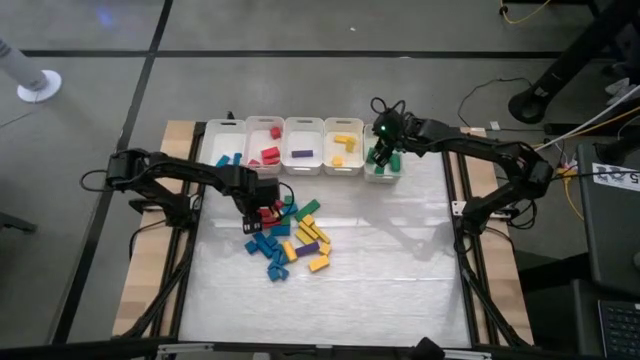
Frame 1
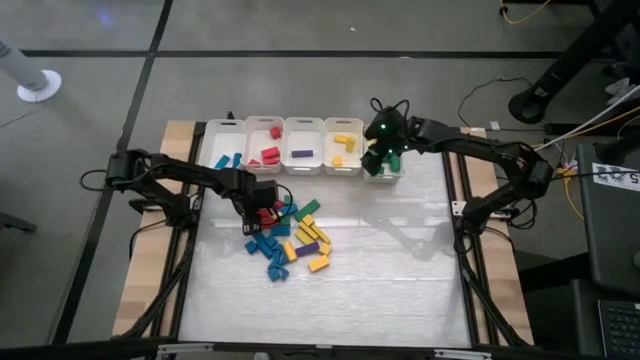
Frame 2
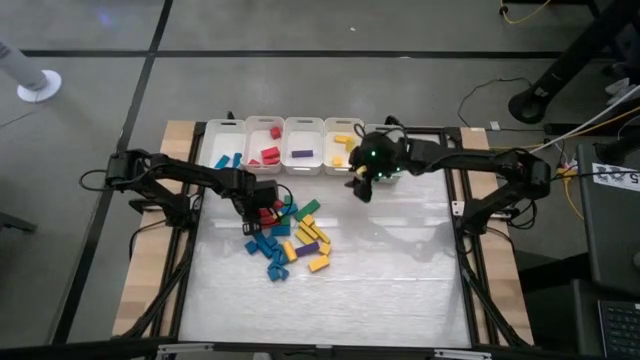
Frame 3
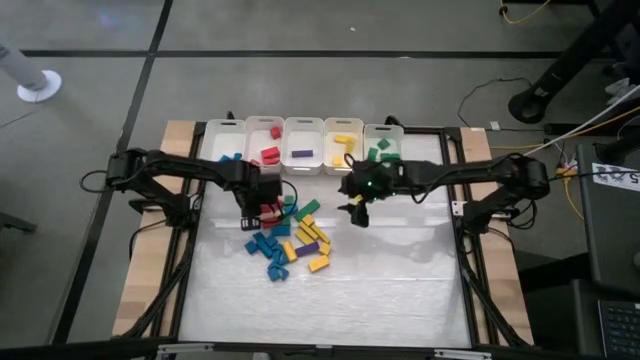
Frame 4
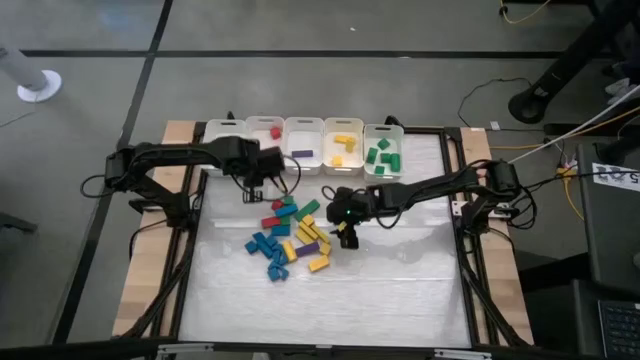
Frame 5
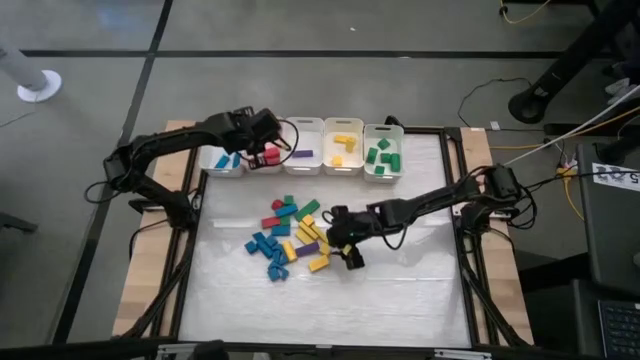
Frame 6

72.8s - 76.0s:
Task: Sort blocks
Put the red block into the middle left white bin

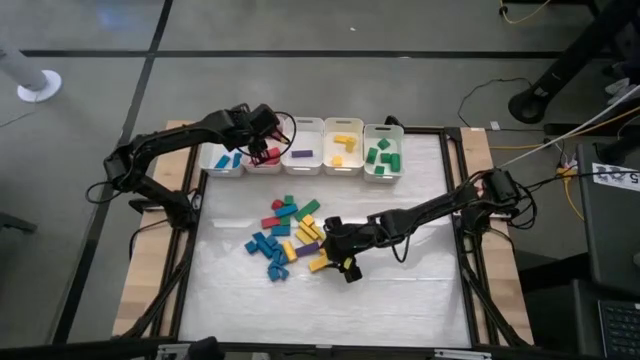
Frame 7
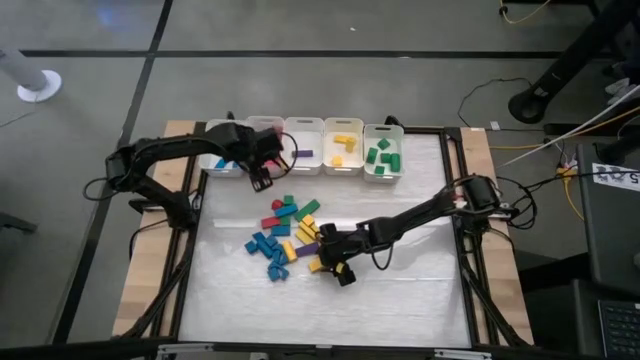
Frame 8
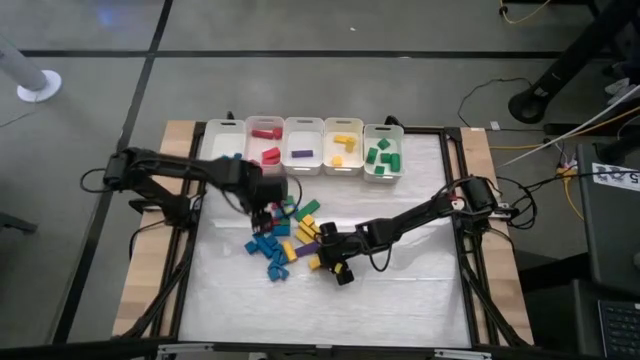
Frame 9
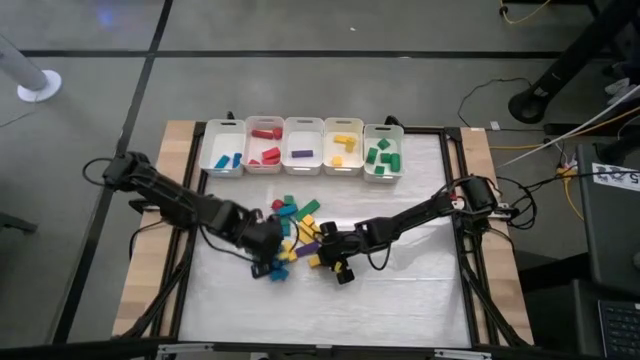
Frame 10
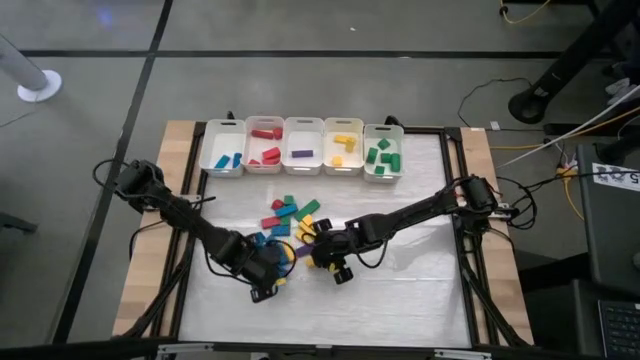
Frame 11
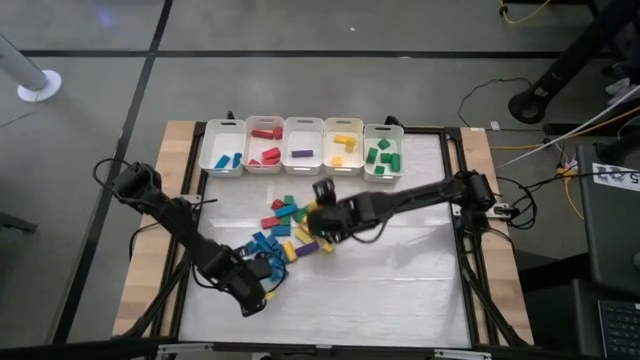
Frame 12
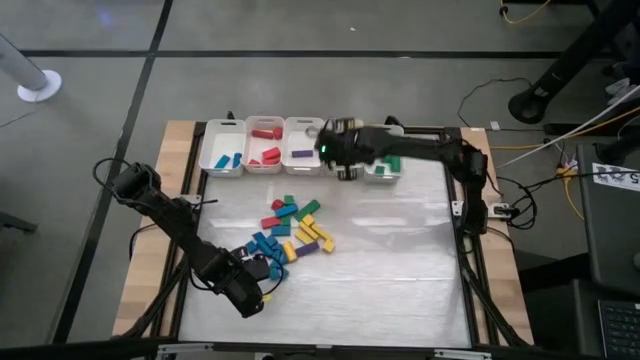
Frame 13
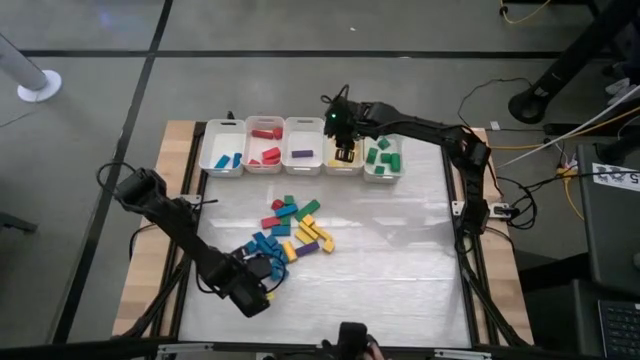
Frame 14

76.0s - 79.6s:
Put the yellow block into the middle right white bin

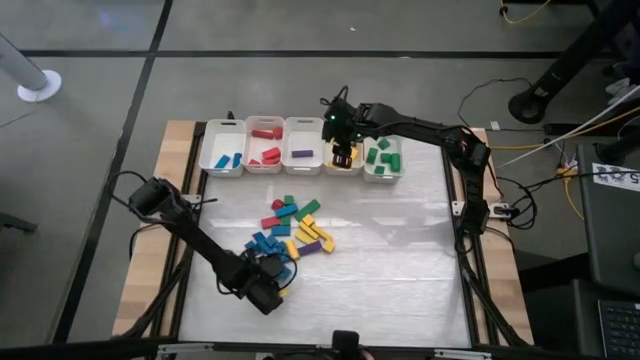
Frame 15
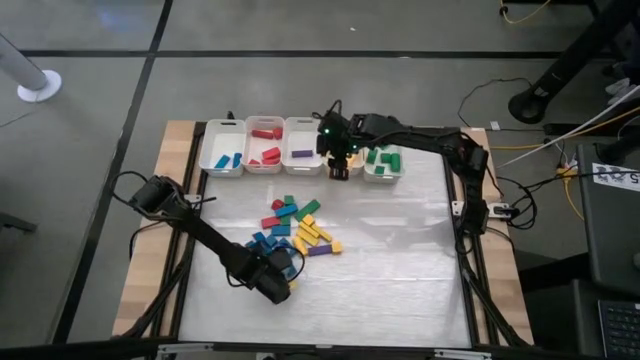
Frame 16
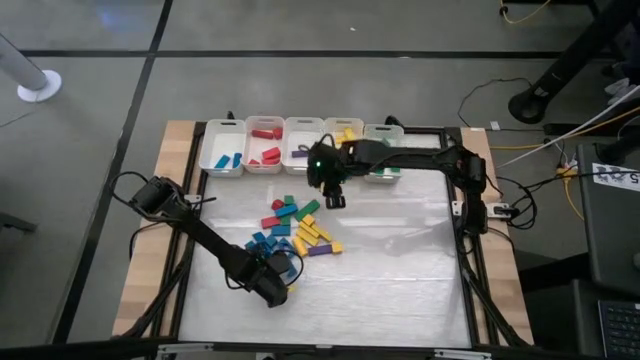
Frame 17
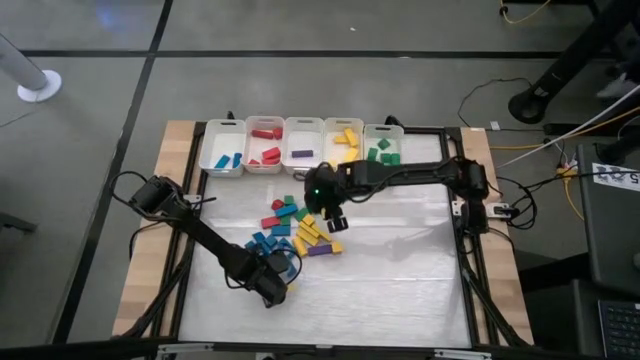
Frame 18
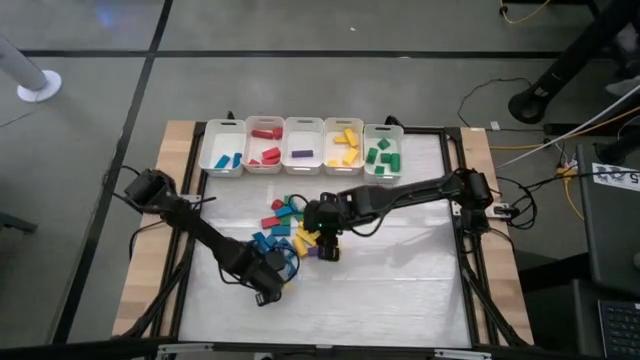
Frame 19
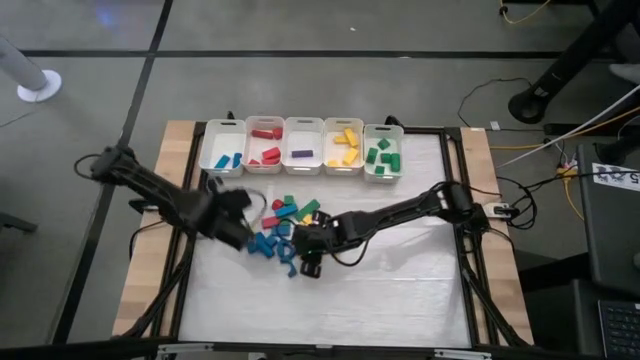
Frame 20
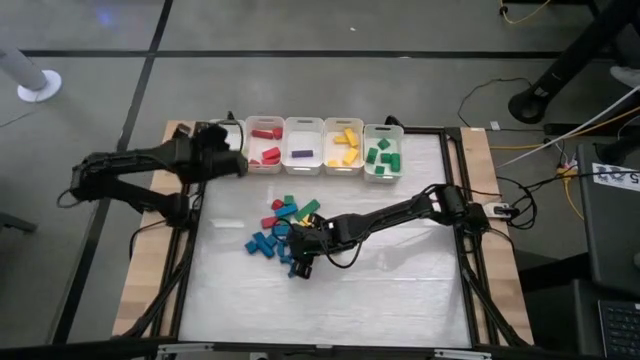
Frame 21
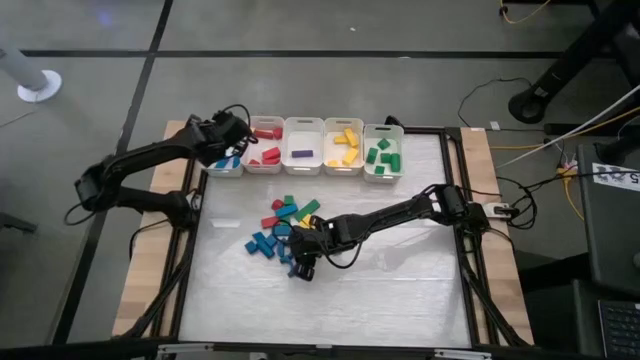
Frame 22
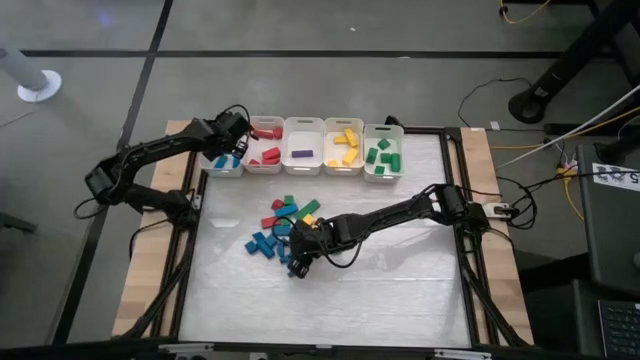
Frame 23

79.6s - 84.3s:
Put the blue block into the left white bin

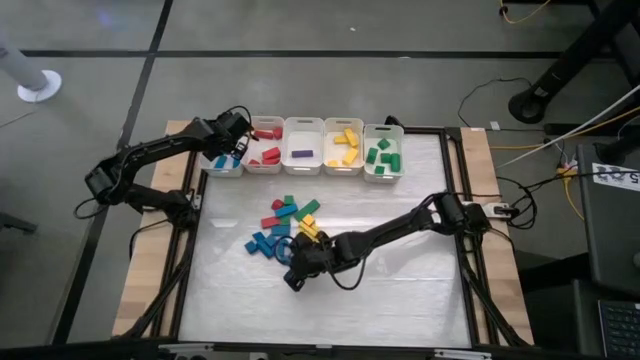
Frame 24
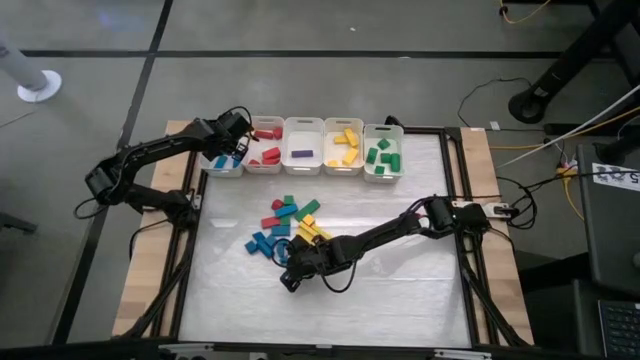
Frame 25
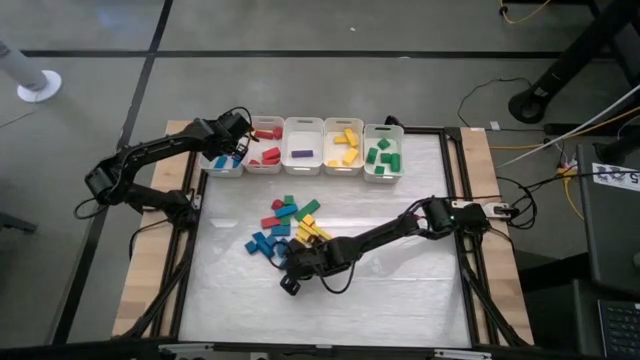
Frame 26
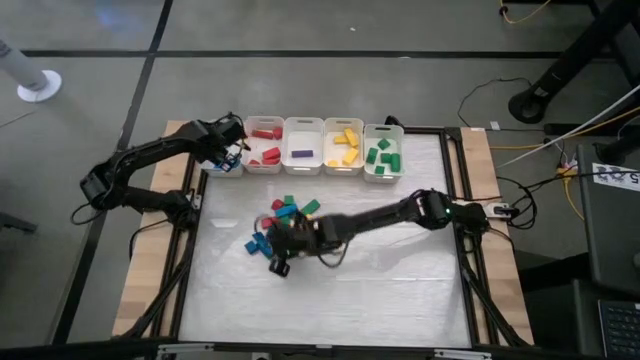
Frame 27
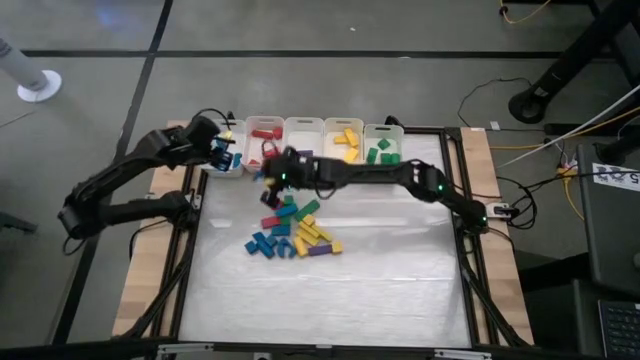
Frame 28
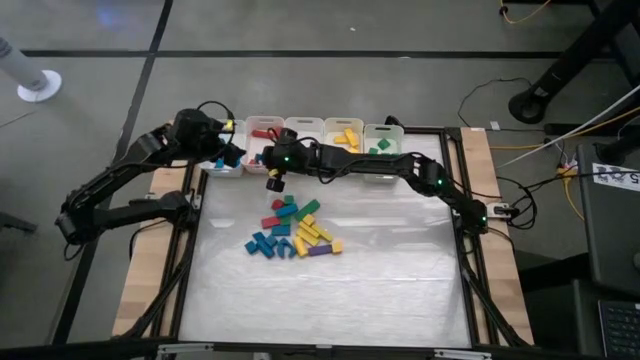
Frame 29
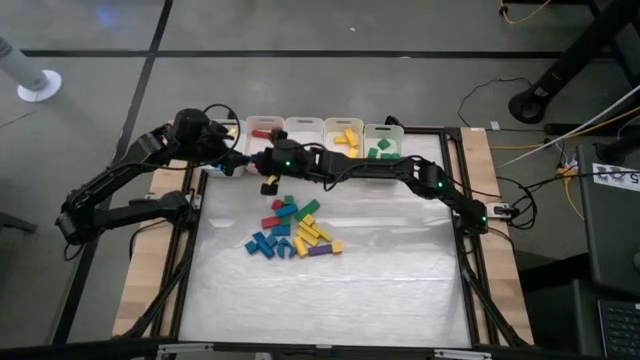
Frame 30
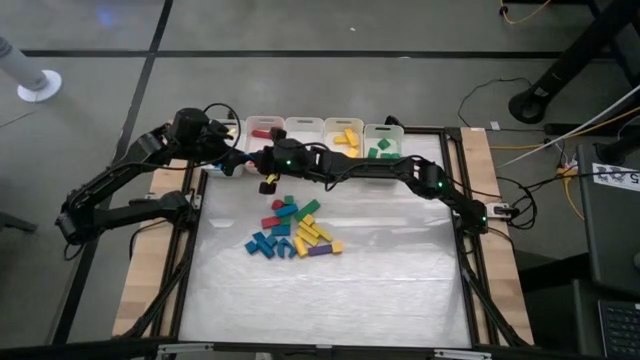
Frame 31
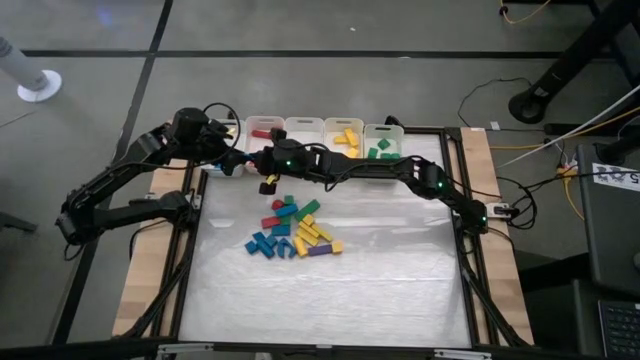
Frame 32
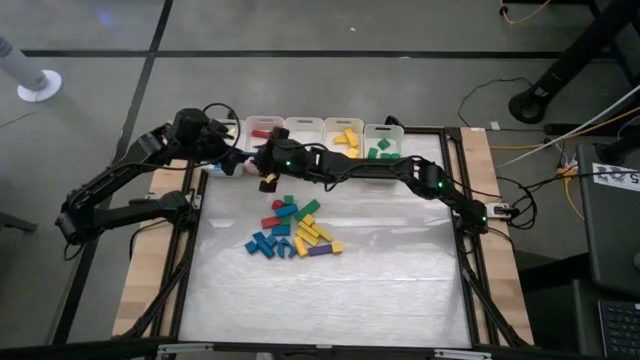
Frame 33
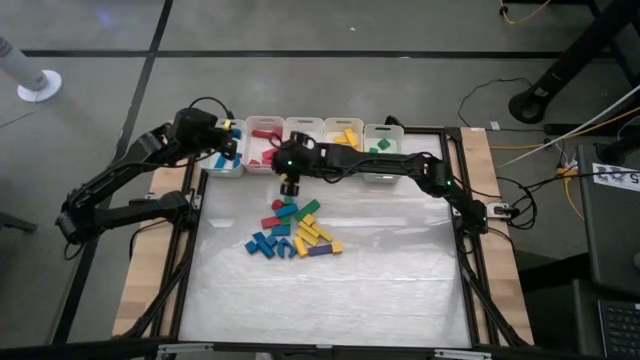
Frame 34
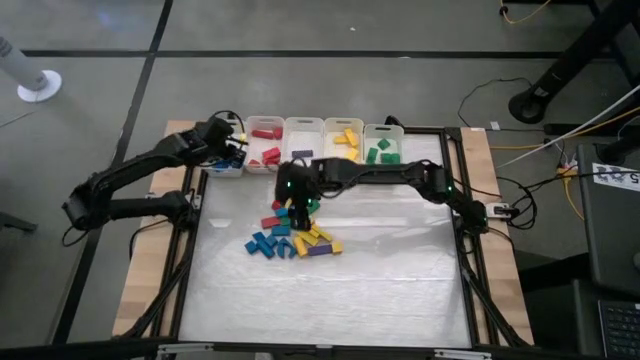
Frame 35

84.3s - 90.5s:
Put the blue block into the left white bin

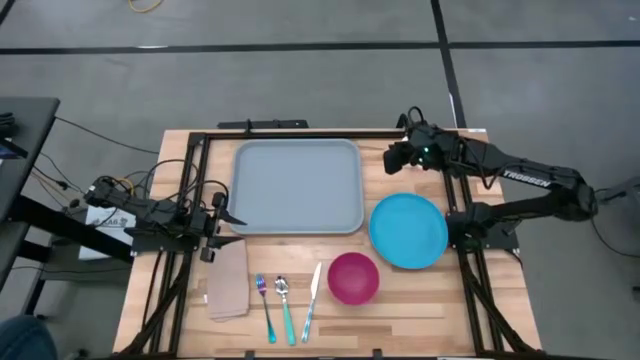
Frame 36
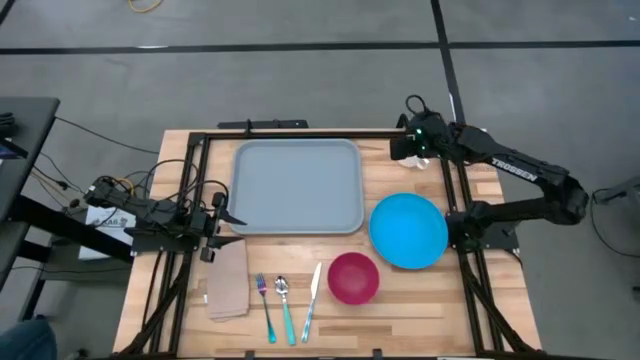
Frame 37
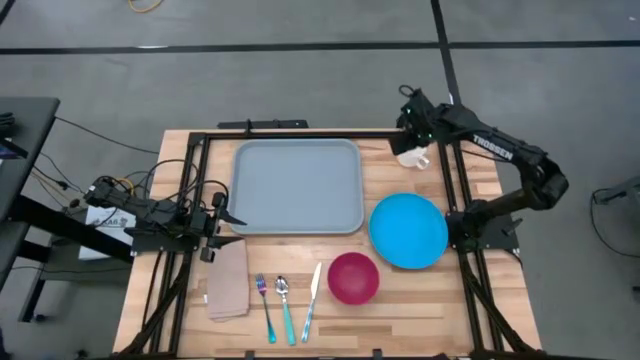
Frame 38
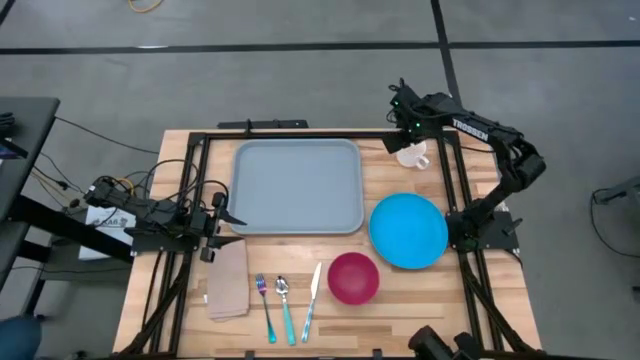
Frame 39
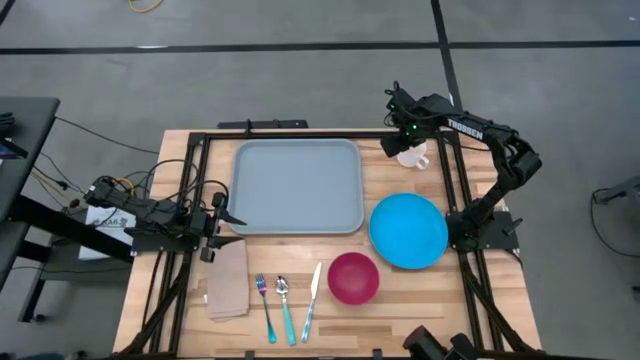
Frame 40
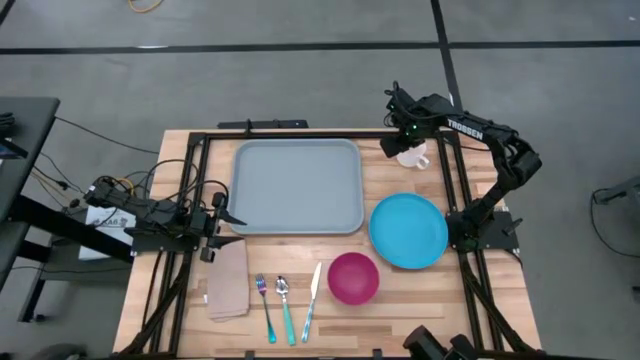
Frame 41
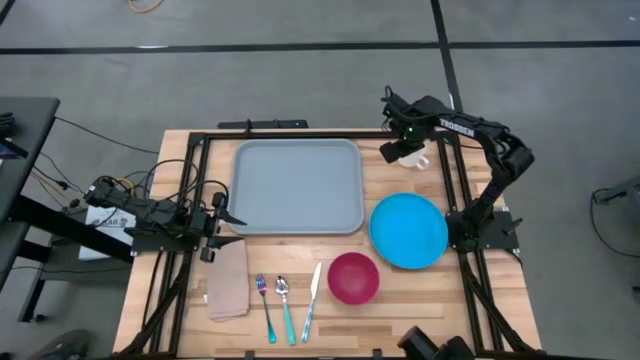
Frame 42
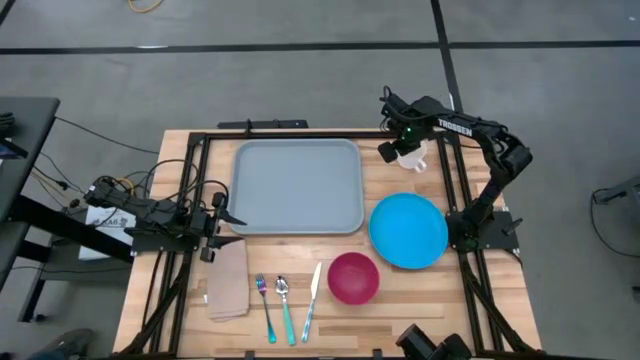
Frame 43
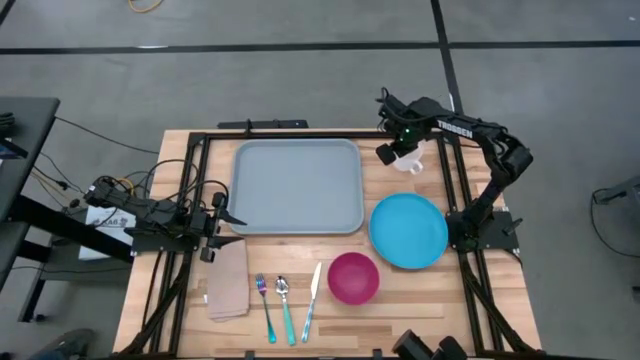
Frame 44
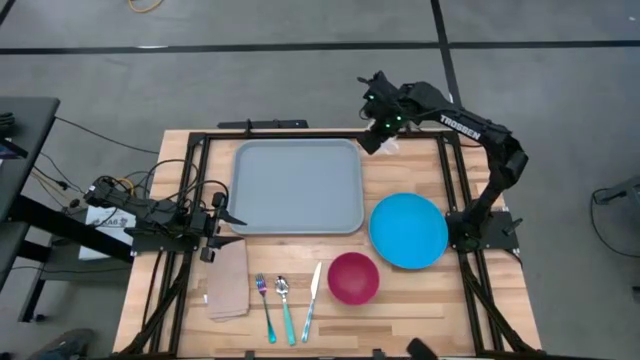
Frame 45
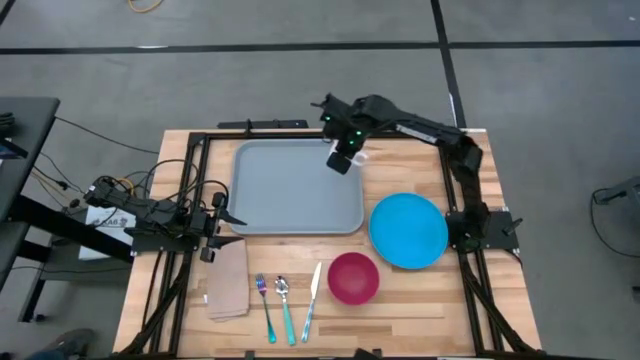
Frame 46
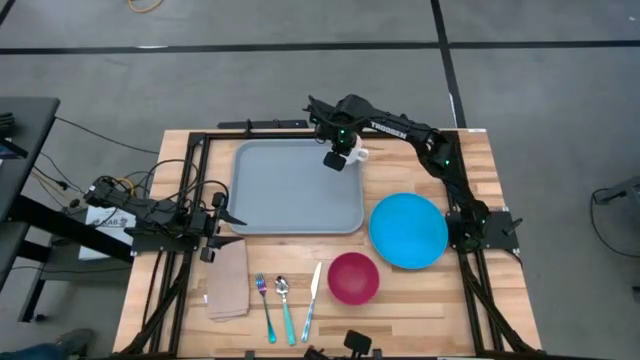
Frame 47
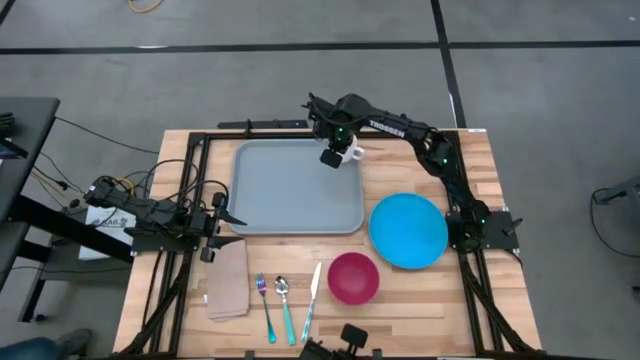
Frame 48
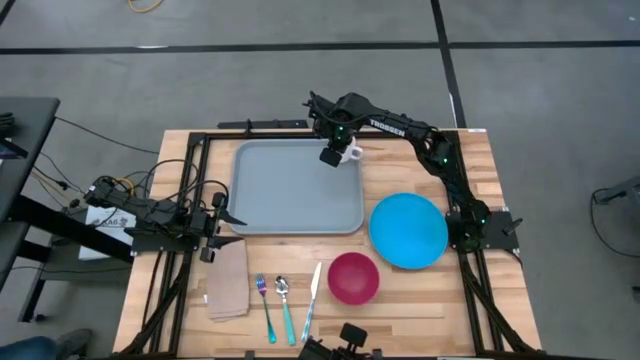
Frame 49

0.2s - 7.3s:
Task: Set up tray
Put the white cup on the top right of the gray serving tray
